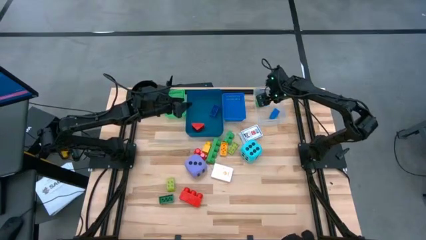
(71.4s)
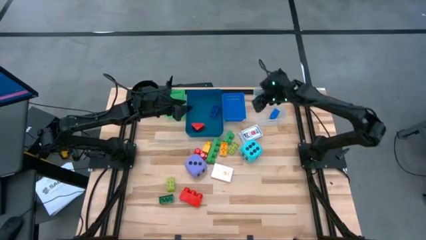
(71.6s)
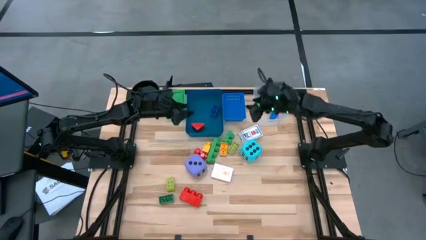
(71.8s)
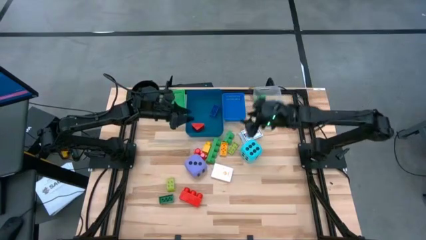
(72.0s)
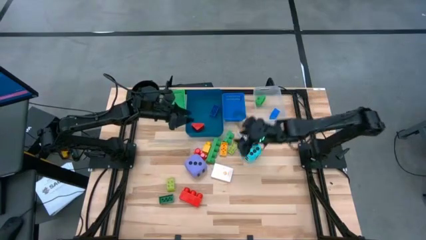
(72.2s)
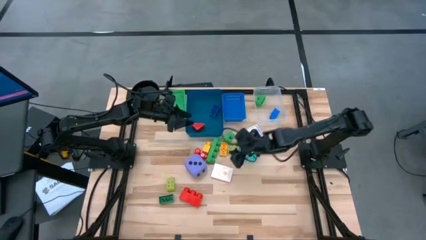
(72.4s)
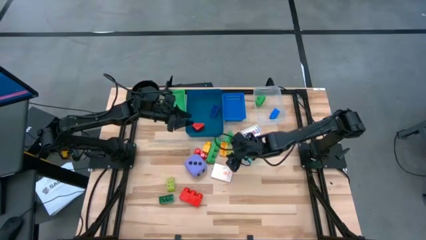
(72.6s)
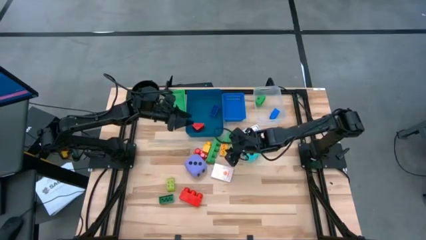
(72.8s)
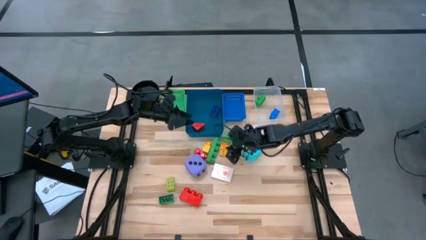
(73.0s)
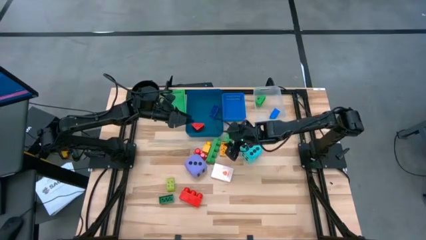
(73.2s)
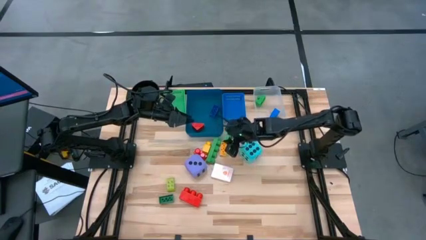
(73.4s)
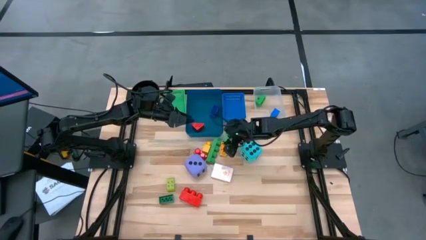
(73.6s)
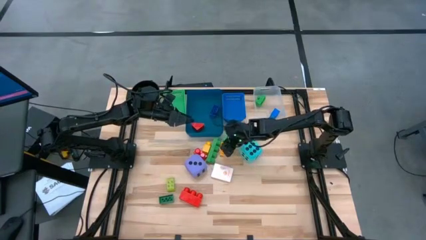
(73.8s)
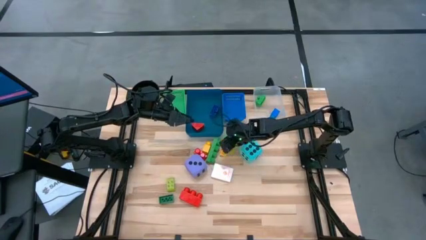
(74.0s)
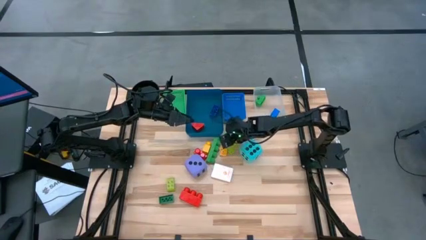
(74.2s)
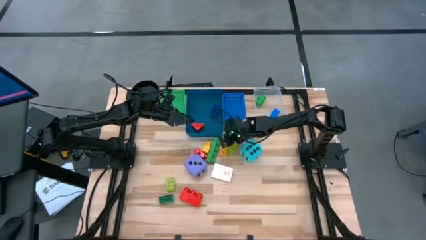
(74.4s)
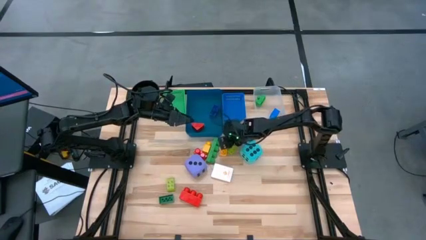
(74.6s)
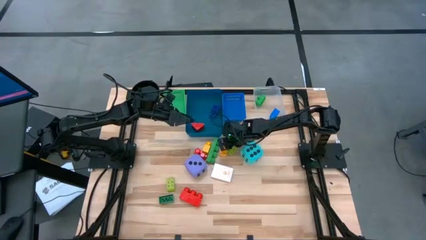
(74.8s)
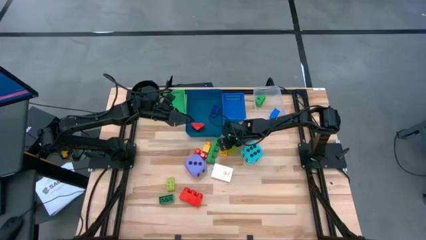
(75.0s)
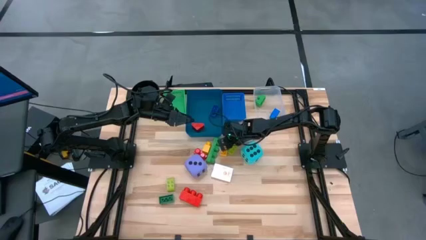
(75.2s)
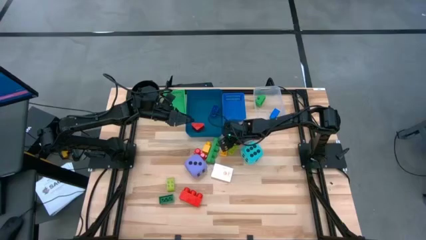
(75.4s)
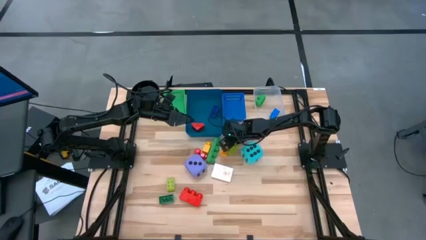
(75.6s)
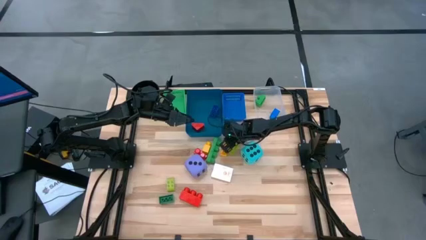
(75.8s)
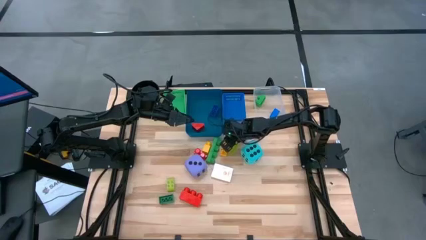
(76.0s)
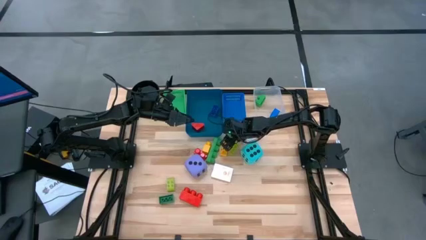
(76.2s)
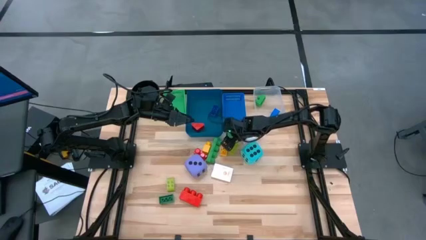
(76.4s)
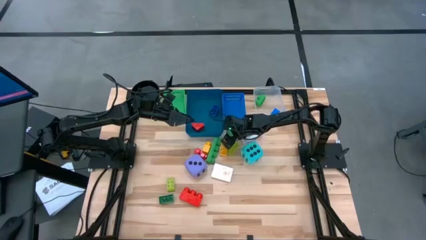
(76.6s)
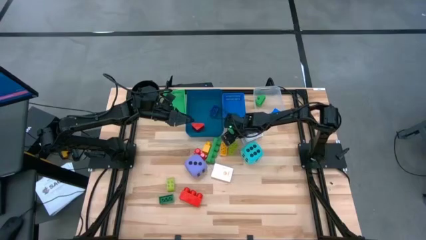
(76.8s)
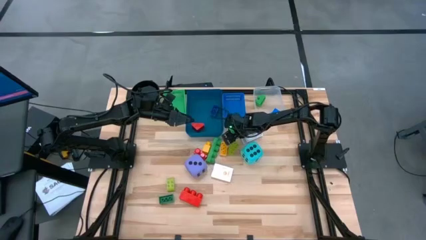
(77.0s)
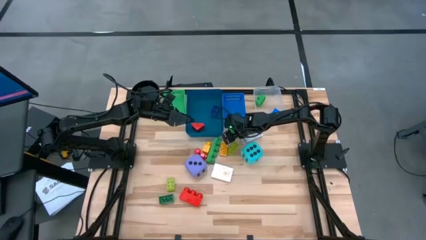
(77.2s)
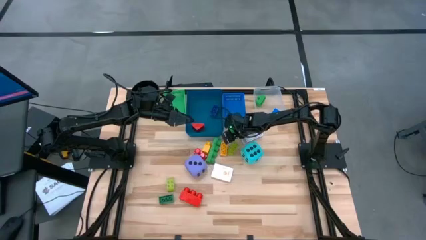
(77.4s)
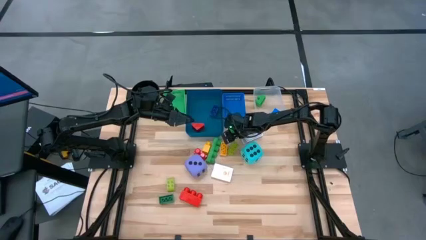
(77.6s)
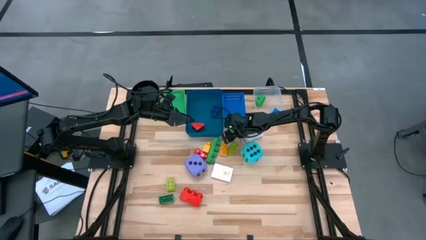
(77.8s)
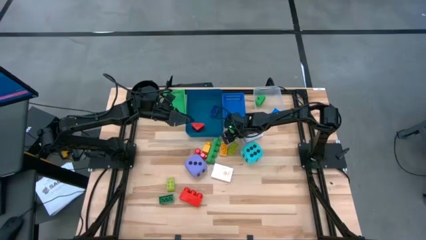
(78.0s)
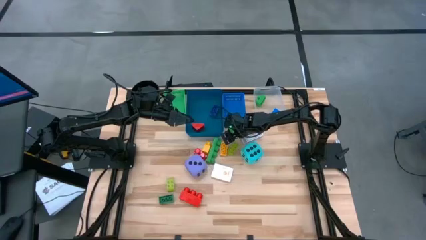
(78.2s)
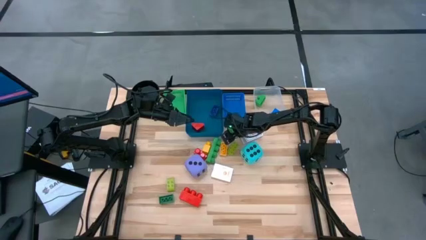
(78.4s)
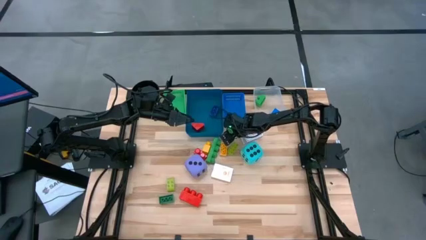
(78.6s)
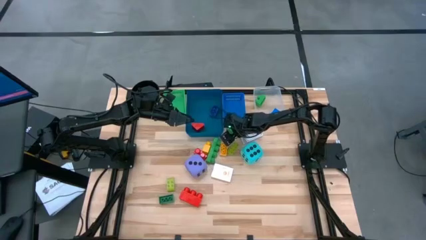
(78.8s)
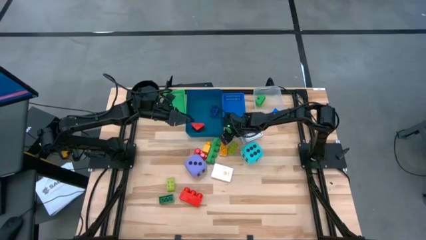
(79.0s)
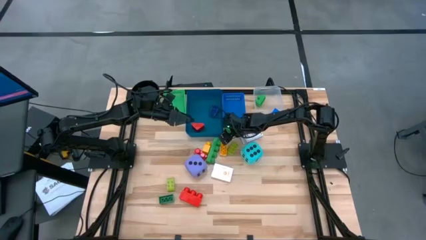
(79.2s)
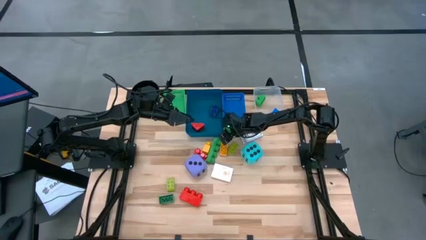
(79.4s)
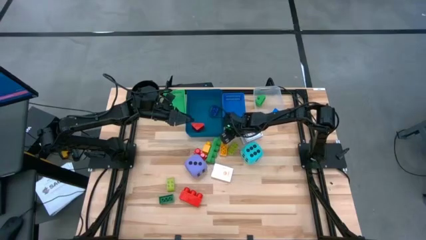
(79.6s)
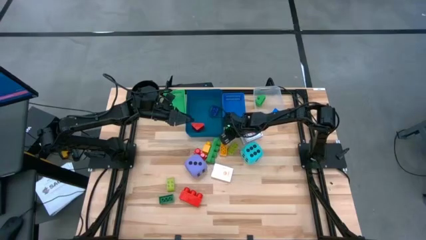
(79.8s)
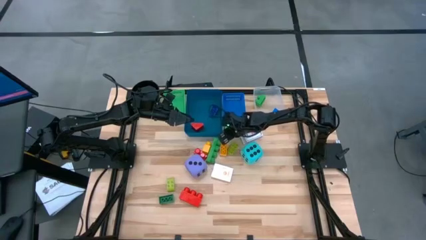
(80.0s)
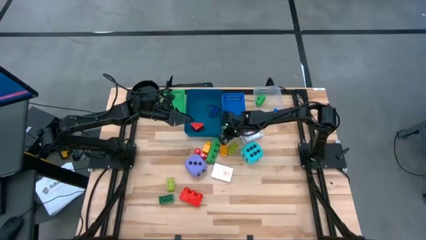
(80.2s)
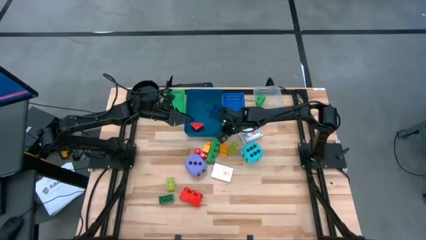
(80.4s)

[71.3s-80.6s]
Task: Pick & Place Toys
Put the large green game piece into the transparent bin

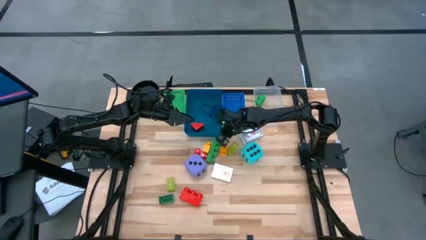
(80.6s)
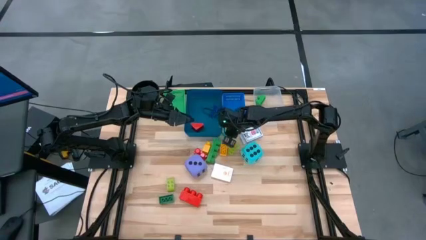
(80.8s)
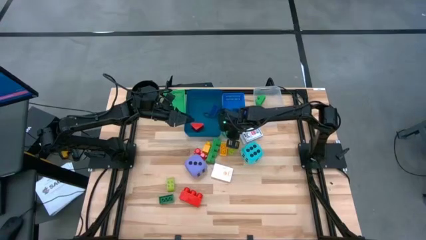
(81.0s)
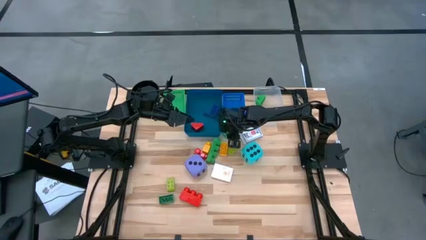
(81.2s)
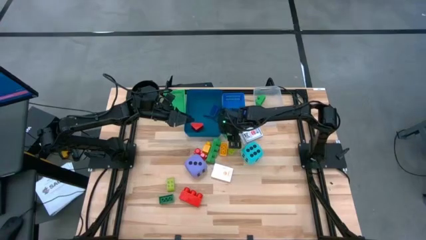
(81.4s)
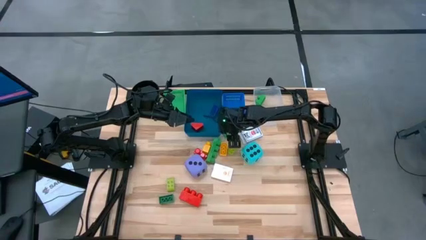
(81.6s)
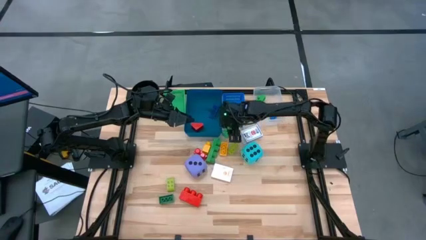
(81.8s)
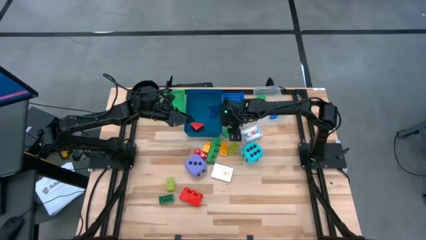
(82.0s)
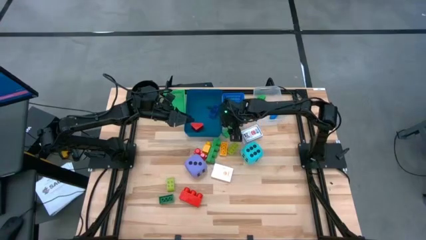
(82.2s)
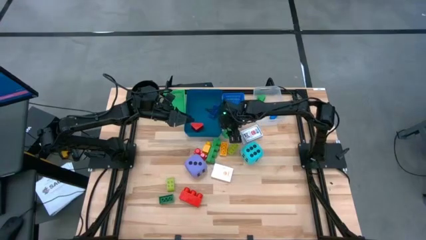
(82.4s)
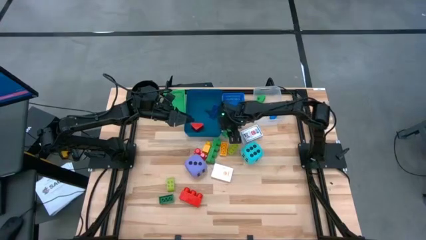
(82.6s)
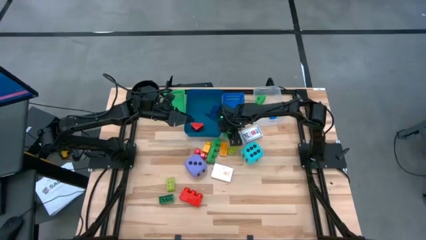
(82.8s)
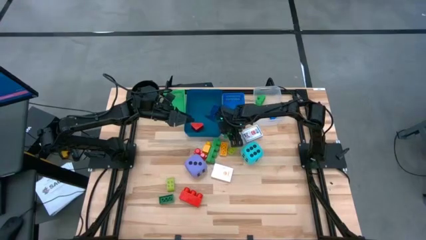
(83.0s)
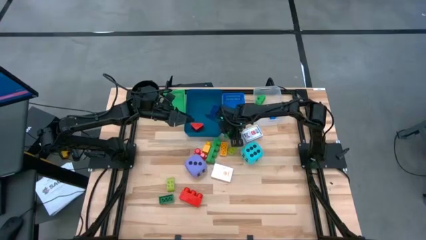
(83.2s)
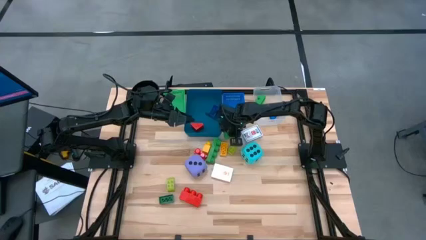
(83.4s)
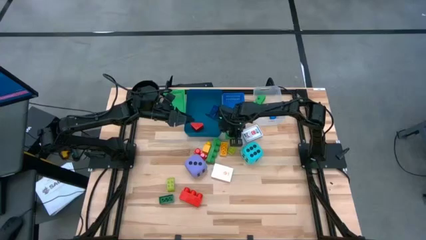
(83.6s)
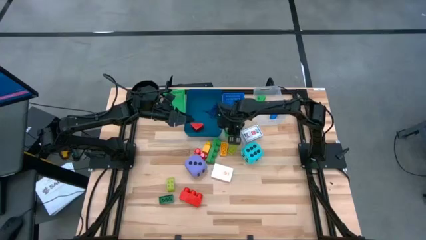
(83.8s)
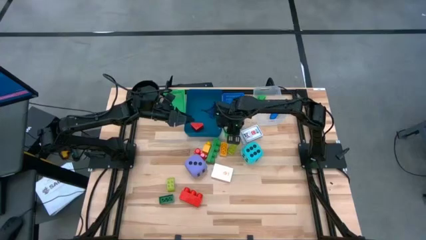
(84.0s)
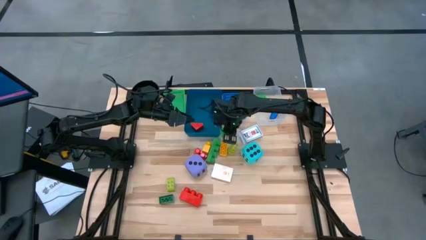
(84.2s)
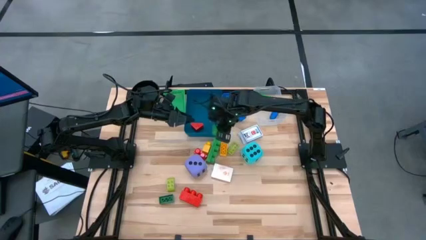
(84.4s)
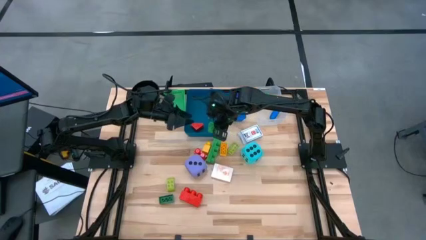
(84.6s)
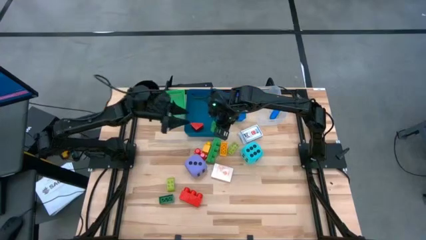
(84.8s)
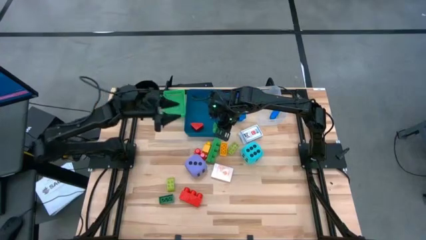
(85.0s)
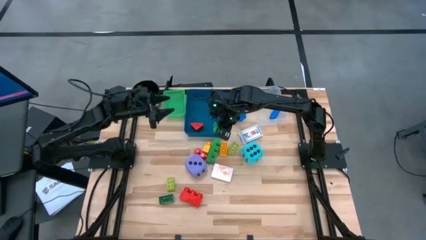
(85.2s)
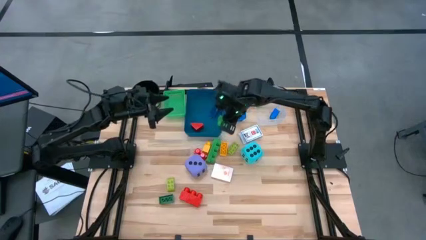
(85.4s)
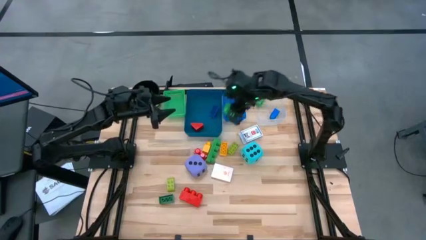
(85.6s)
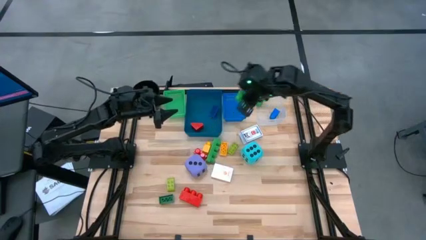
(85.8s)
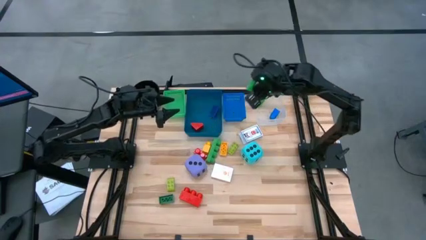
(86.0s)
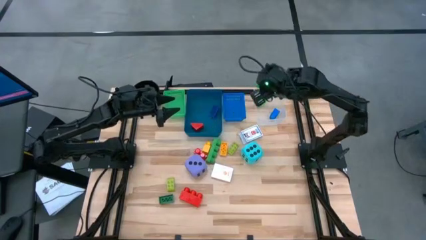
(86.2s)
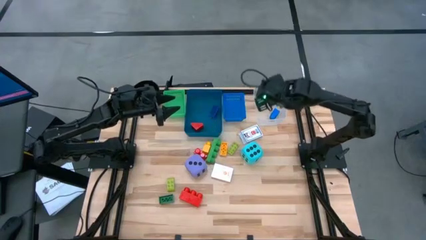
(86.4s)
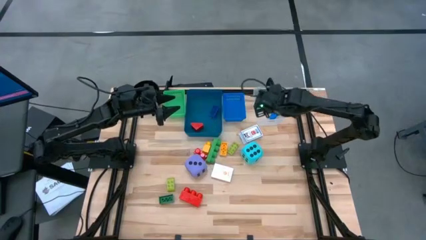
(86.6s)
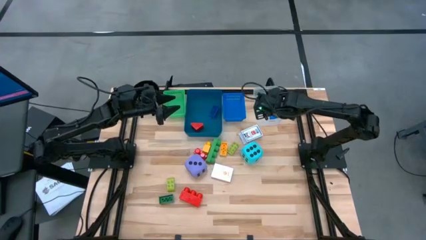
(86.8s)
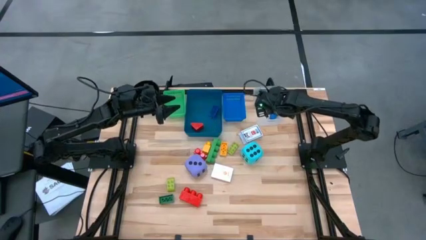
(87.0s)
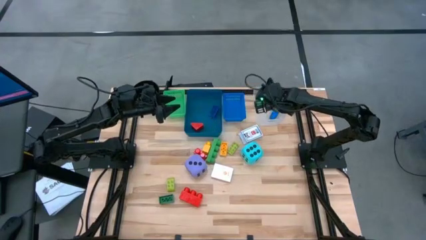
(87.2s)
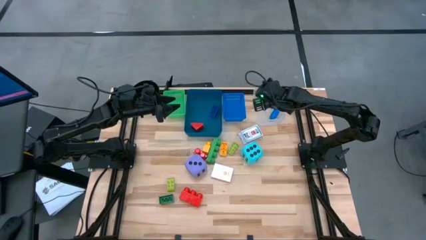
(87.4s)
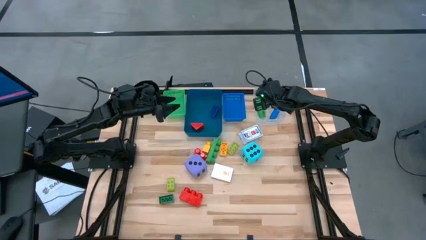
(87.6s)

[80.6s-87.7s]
Put the large green game piece into the transparent bin
